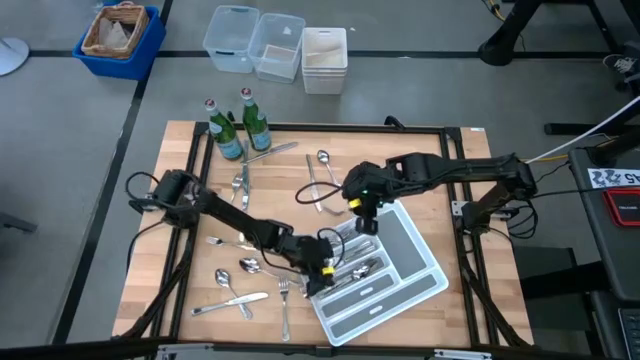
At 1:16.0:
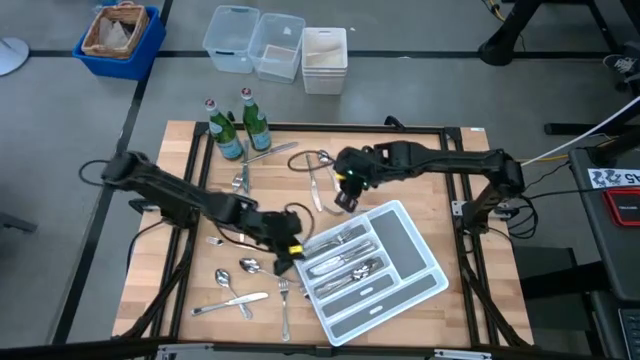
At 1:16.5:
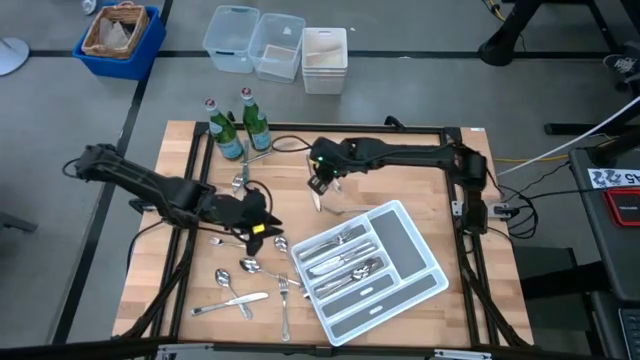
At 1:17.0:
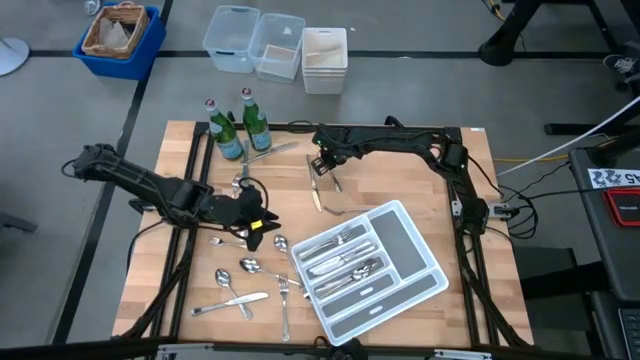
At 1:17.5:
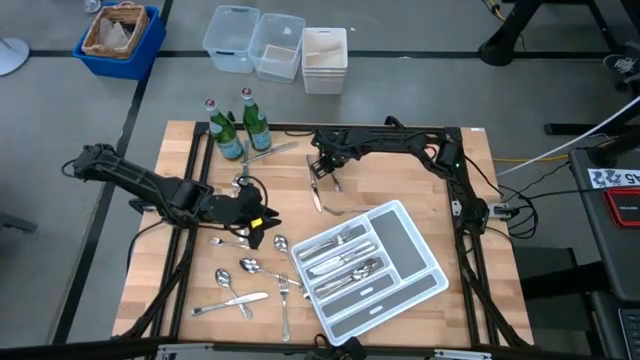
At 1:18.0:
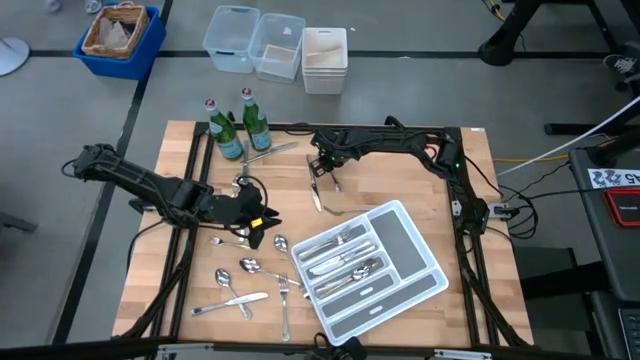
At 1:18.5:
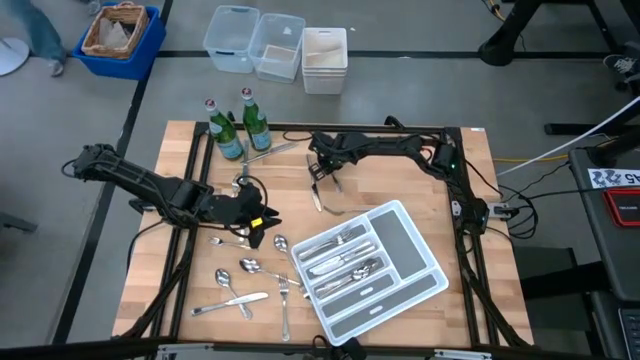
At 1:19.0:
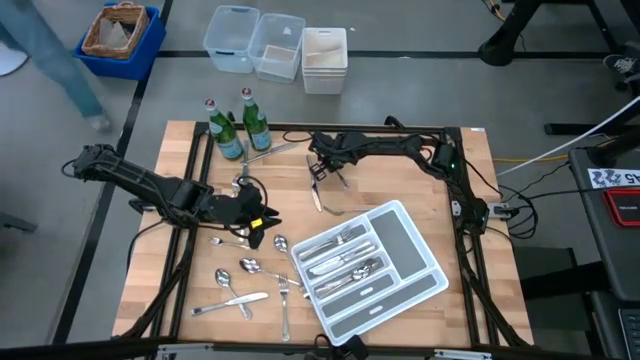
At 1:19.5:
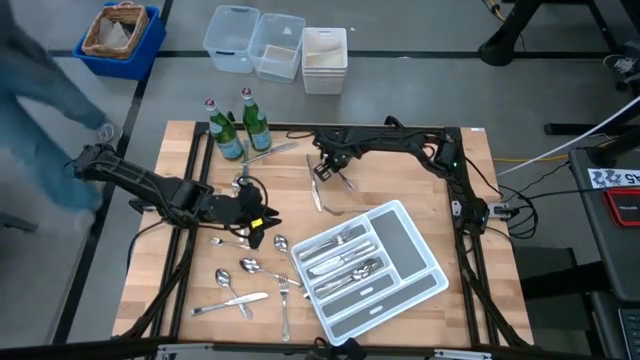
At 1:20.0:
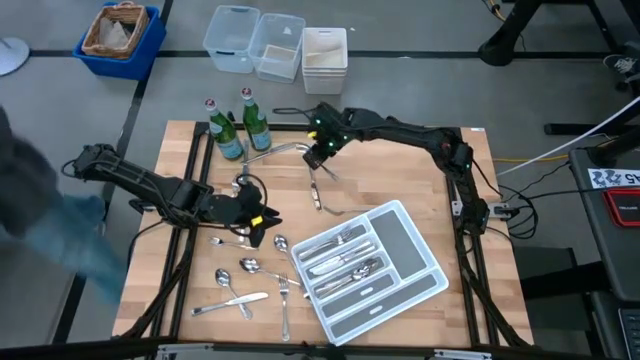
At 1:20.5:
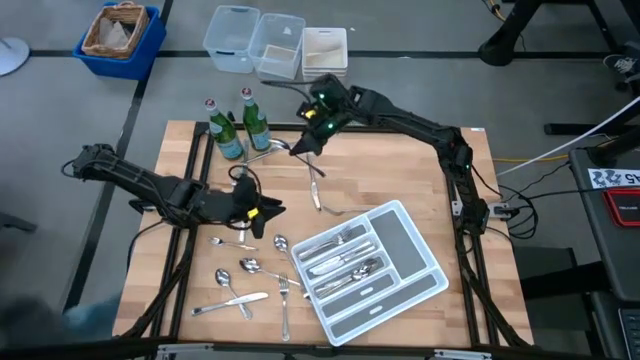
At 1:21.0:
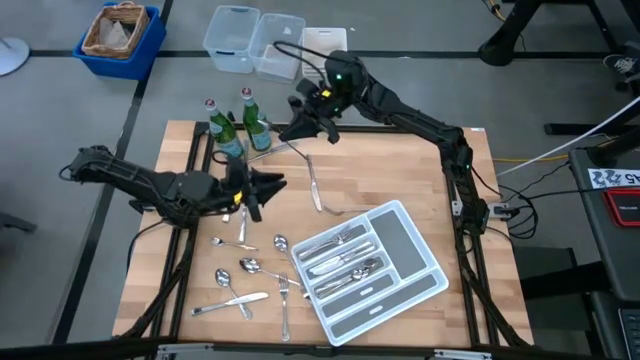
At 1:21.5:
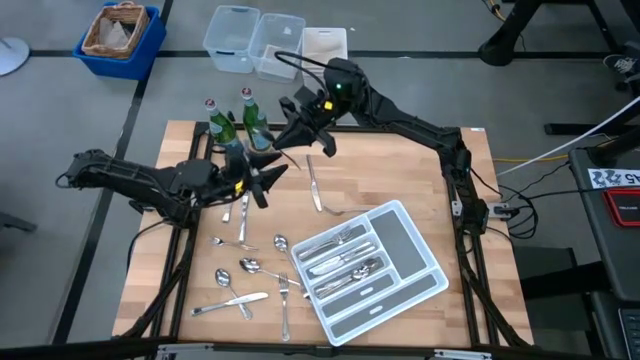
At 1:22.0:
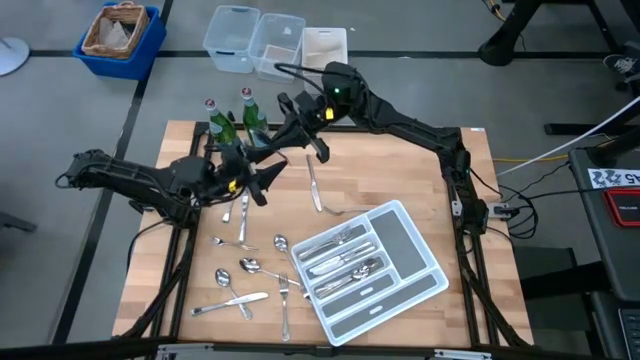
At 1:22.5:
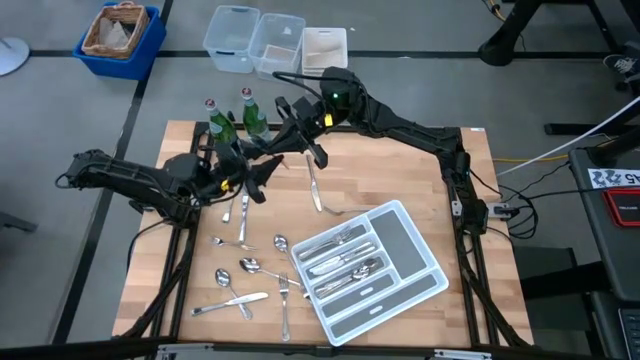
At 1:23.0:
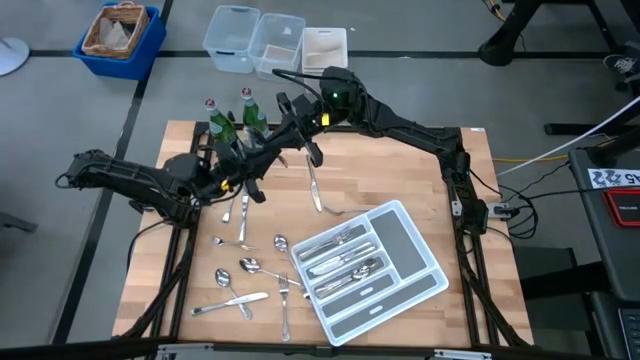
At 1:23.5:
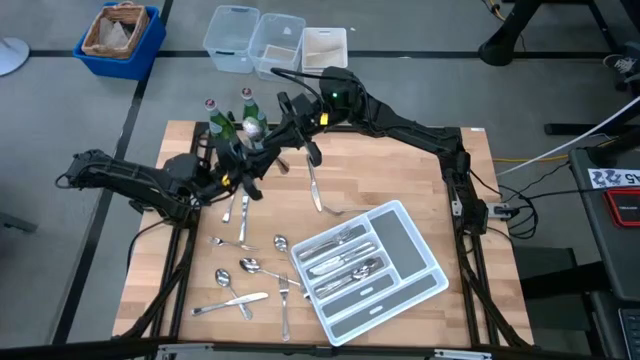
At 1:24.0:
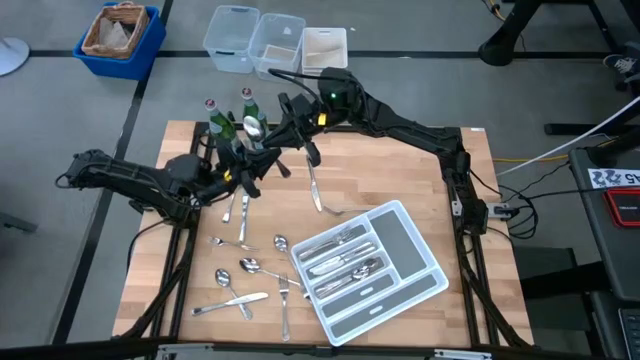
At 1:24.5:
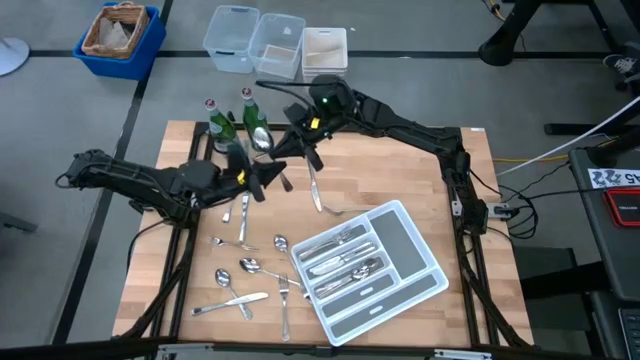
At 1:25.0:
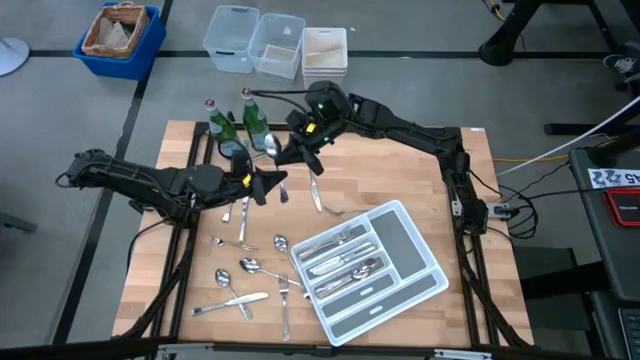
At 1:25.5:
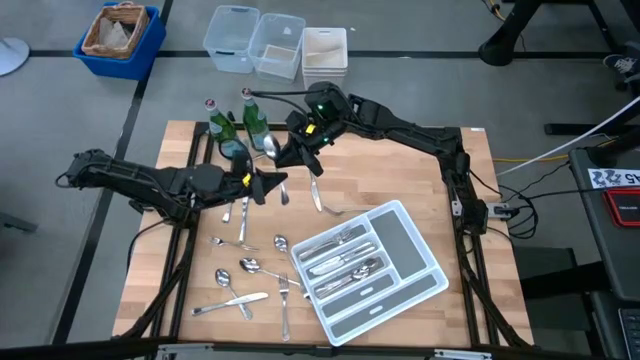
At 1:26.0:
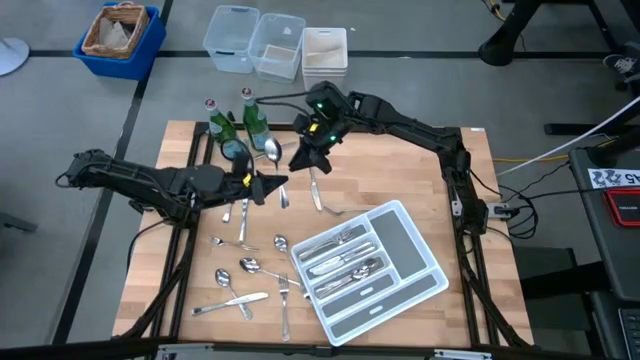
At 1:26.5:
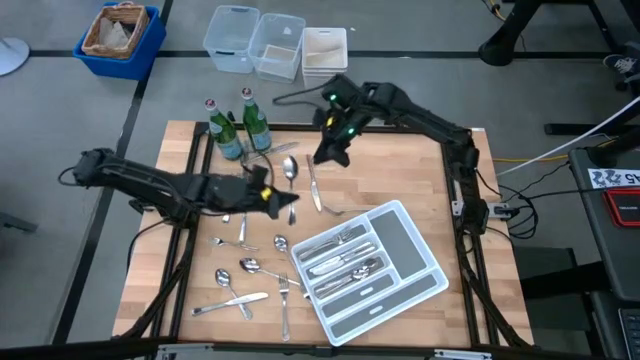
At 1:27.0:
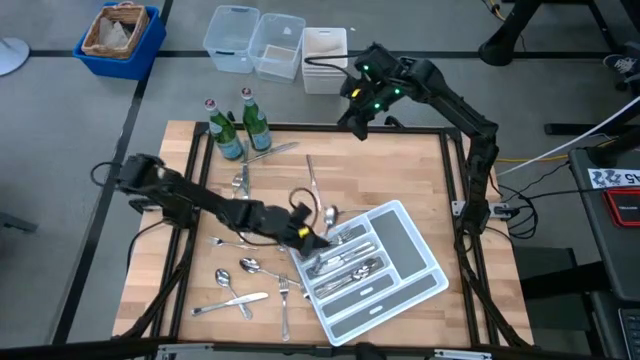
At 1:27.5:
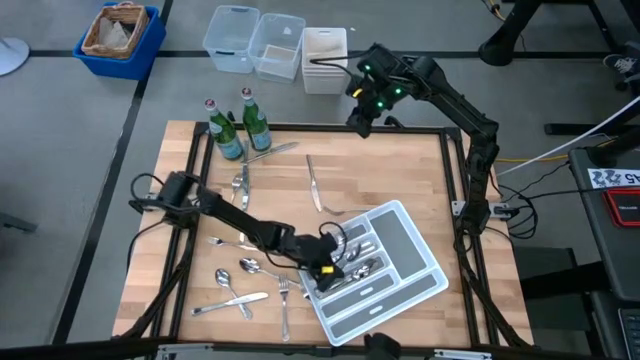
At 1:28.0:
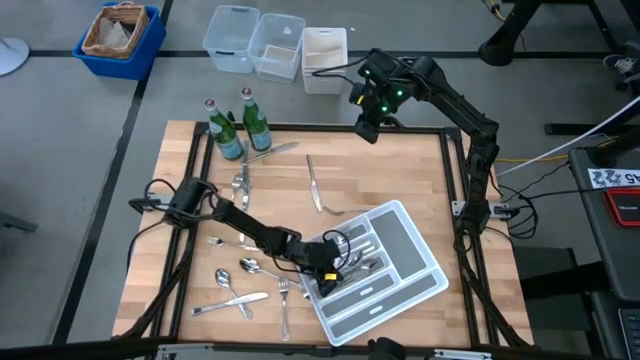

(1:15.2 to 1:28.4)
Task: Sort silverware
Put the silver spoon into the white silverware tray

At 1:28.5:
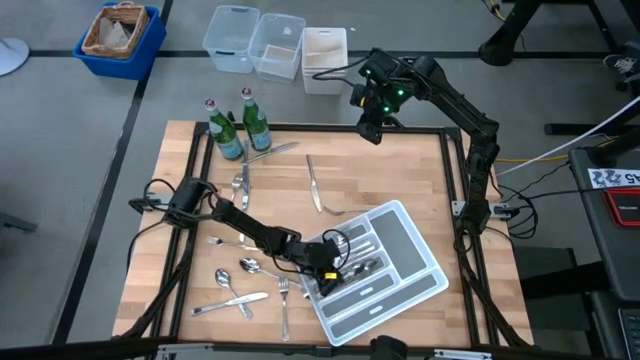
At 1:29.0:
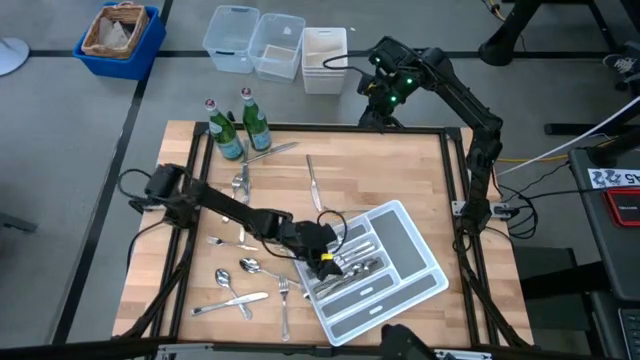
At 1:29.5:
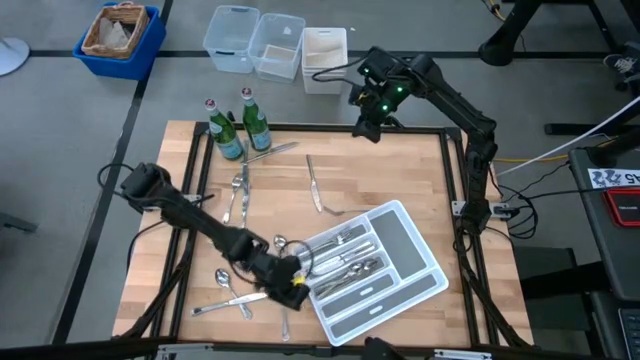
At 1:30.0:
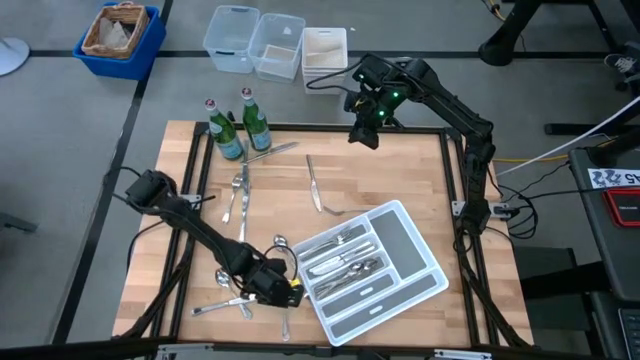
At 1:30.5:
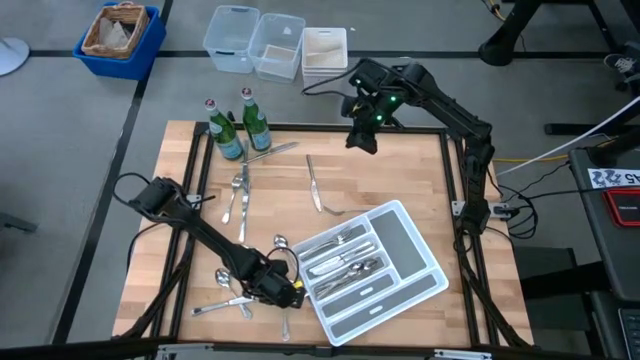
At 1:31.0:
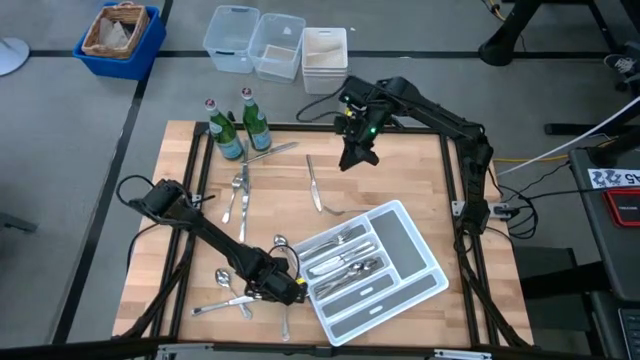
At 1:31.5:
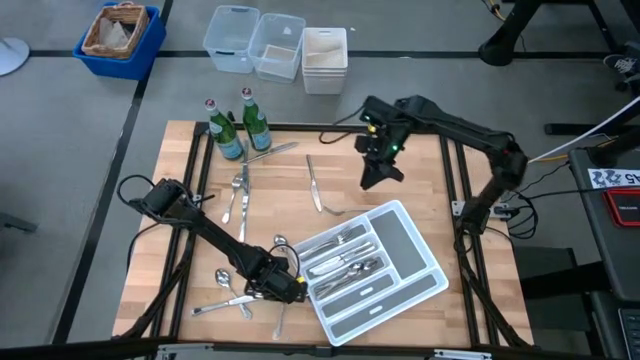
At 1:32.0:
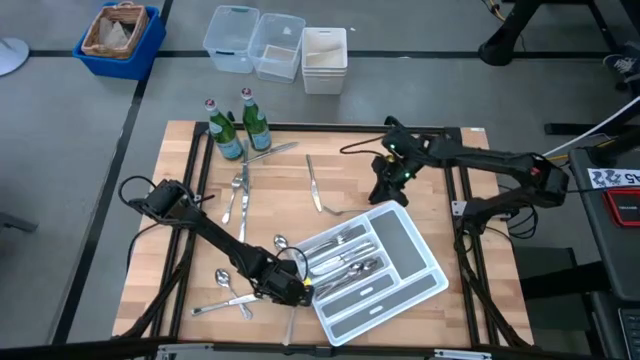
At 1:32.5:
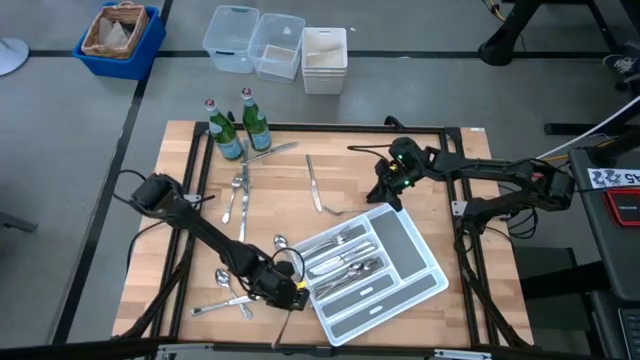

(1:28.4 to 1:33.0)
Put the silver fork into the white silverware tray

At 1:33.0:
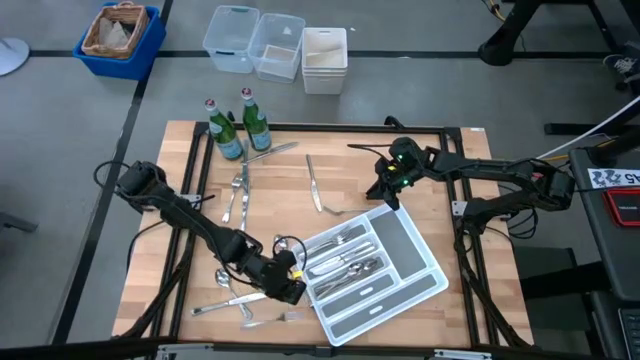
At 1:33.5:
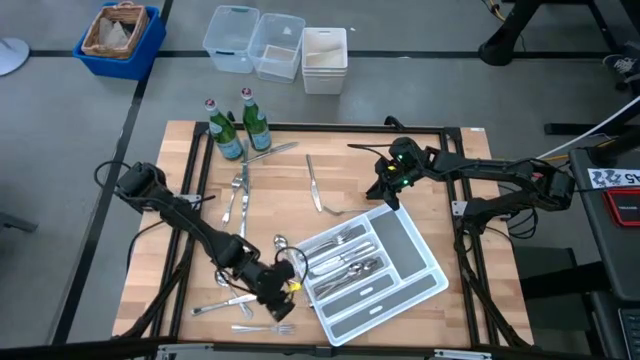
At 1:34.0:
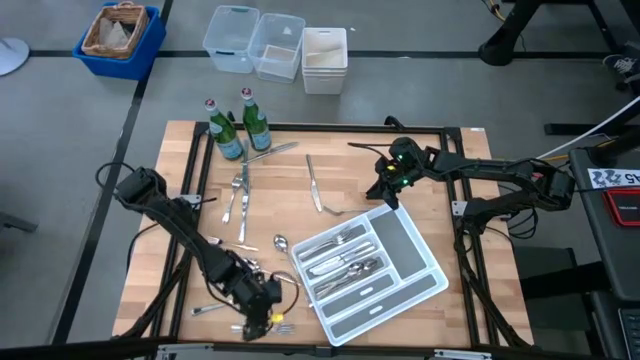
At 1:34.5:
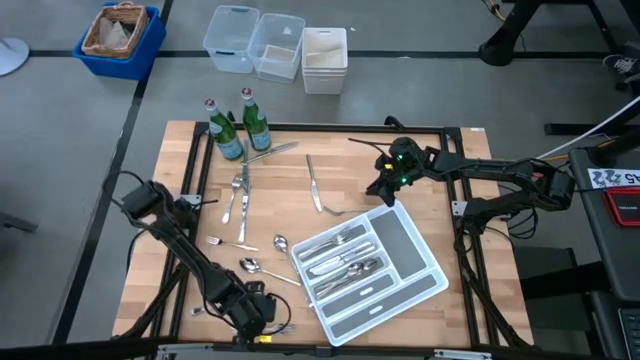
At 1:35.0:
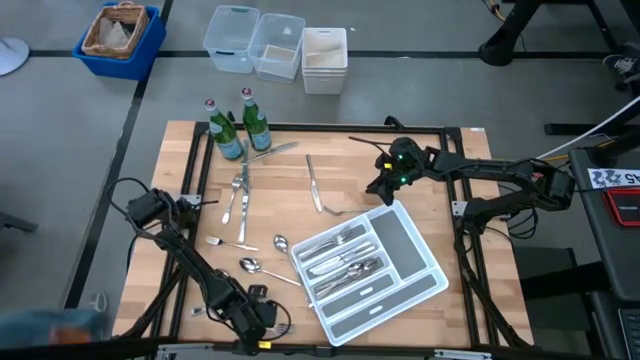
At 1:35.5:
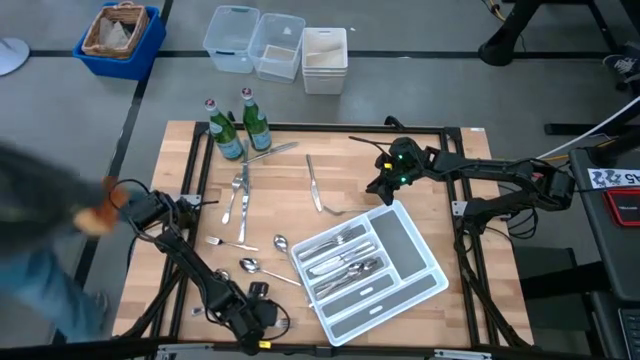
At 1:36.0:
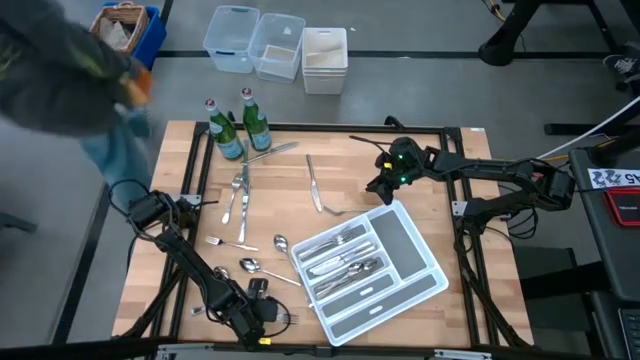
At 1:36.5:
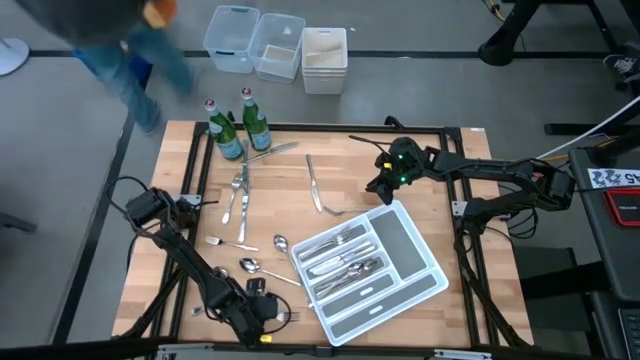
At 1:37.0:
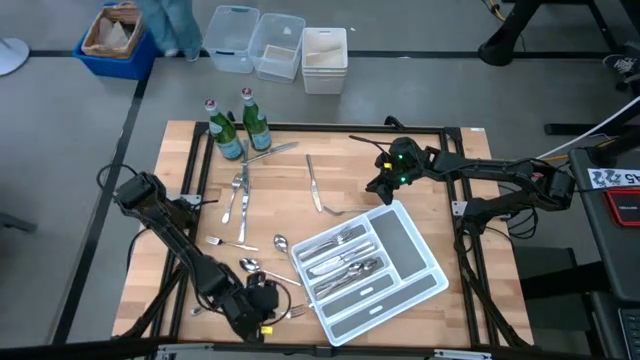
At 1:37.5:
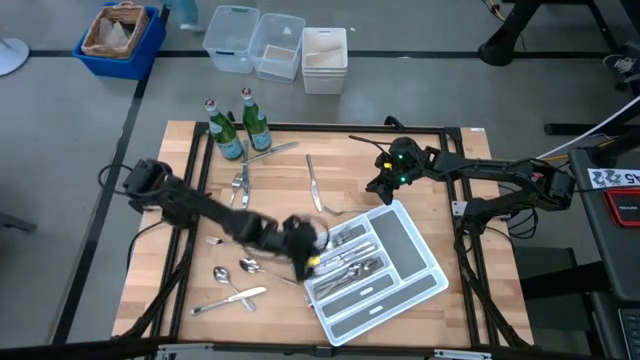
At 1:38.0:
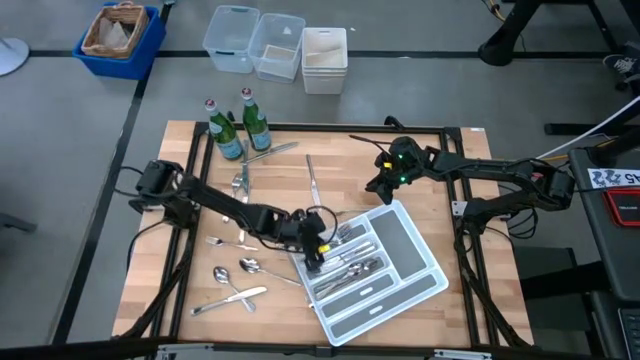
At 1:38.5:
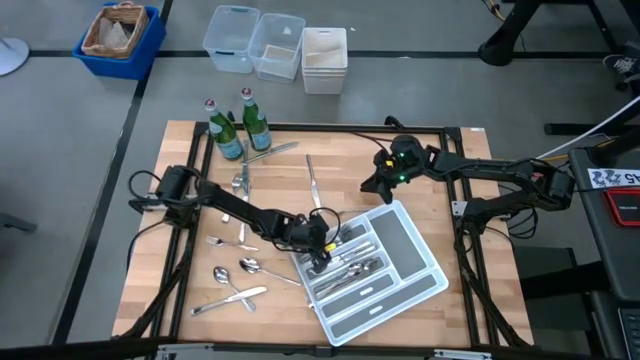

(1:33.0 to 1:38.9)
Put the silver fork into the white silverware tray
